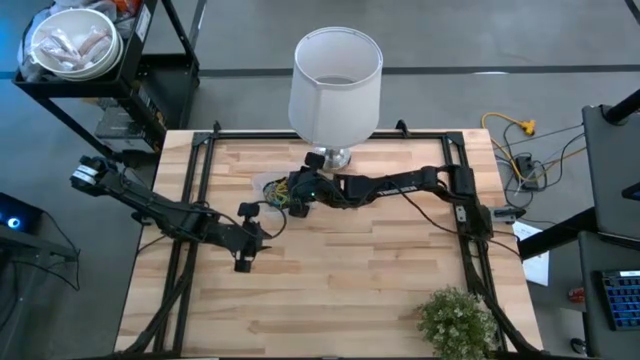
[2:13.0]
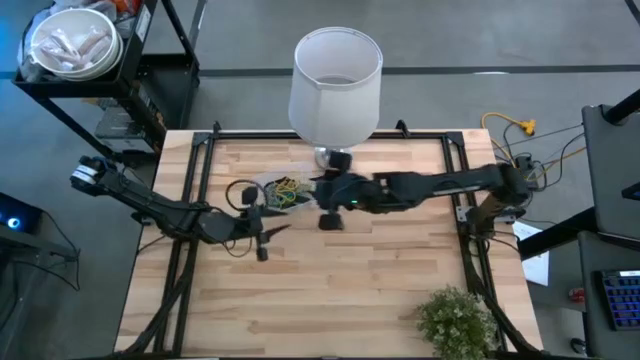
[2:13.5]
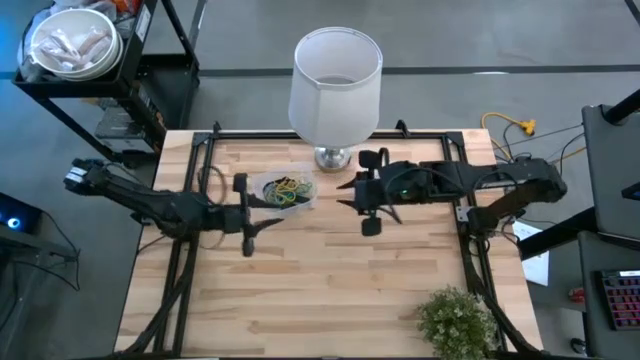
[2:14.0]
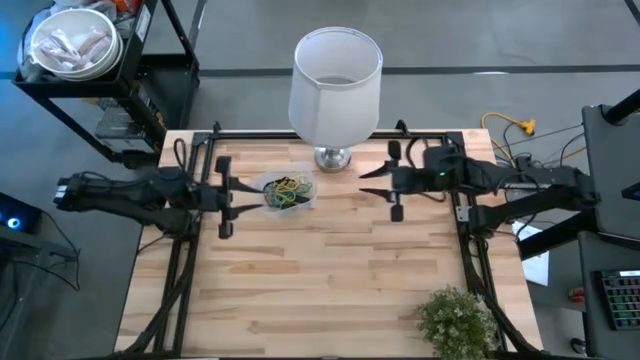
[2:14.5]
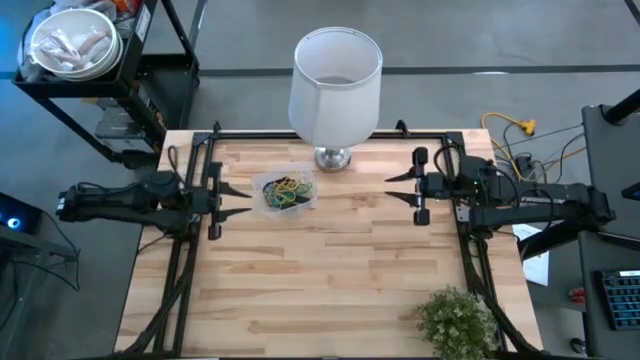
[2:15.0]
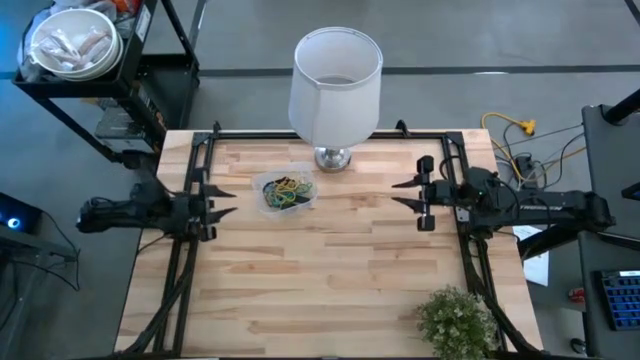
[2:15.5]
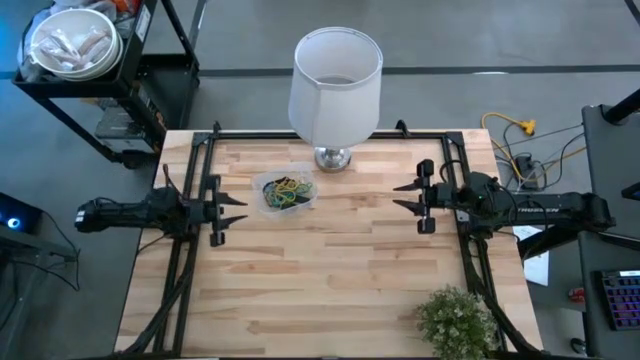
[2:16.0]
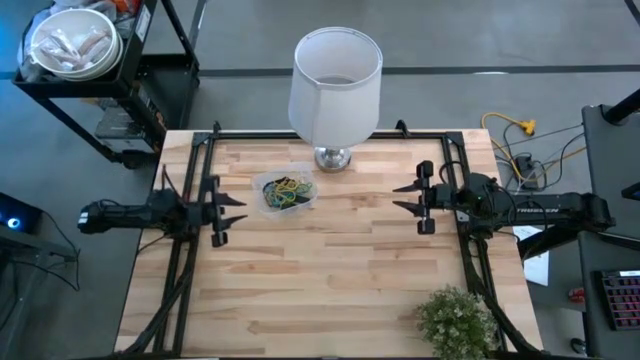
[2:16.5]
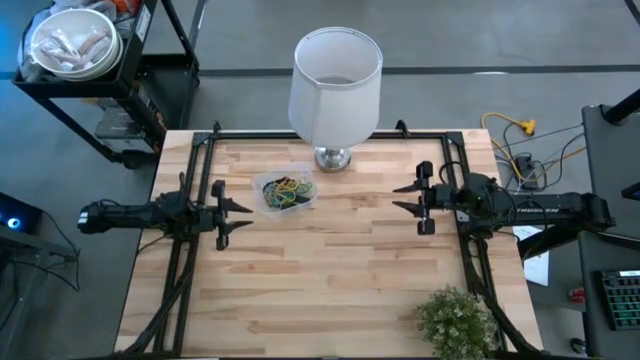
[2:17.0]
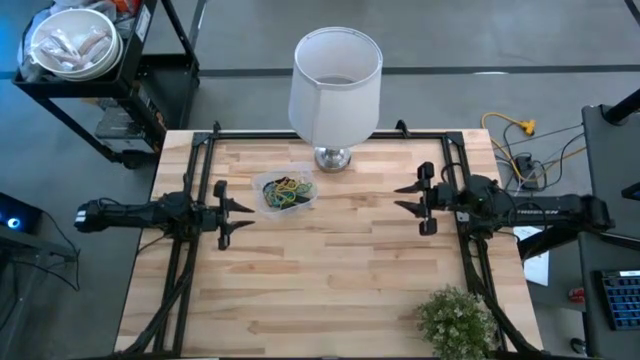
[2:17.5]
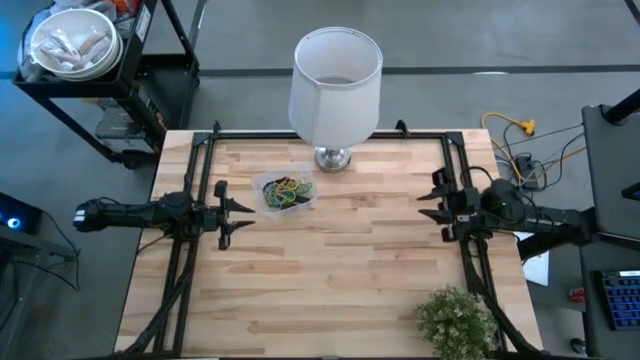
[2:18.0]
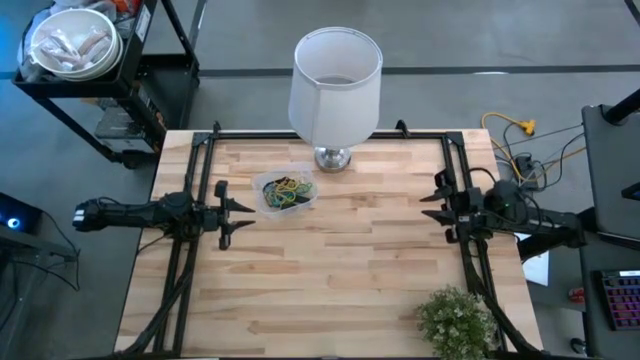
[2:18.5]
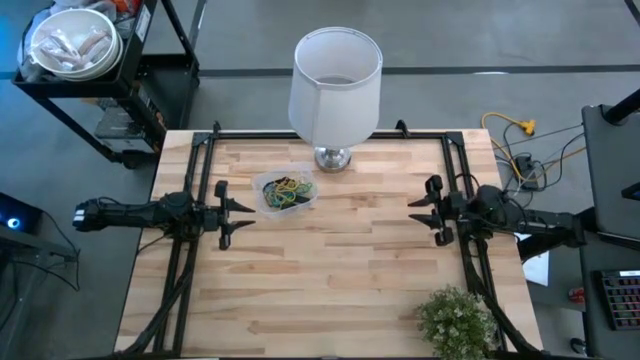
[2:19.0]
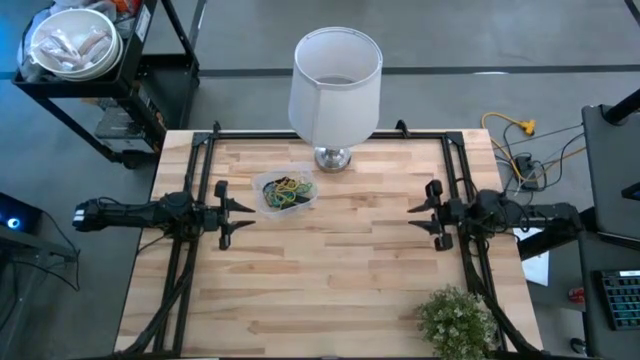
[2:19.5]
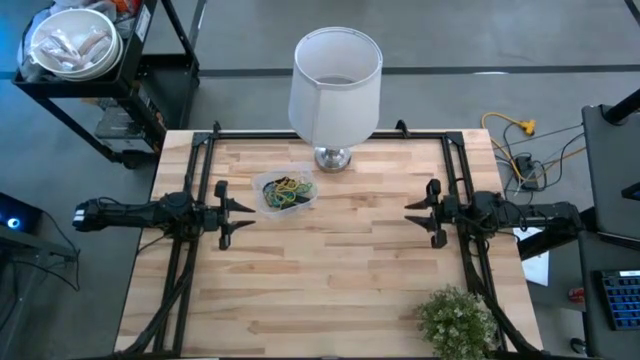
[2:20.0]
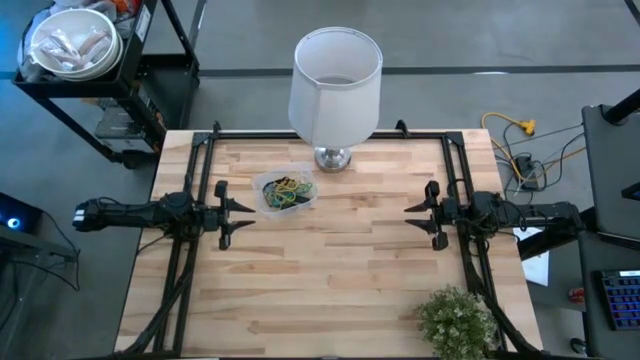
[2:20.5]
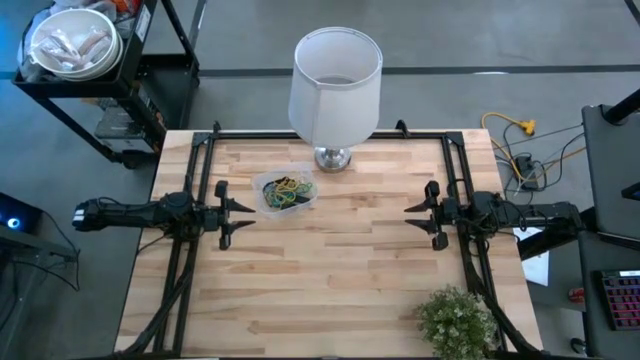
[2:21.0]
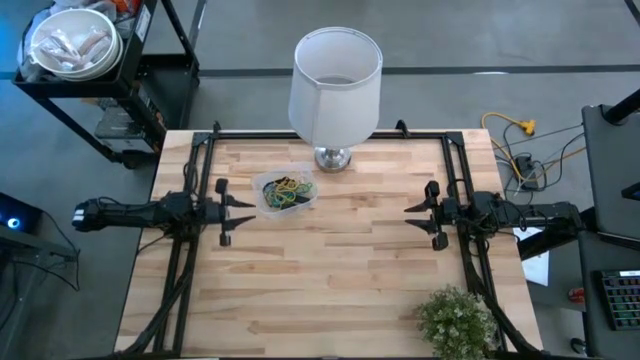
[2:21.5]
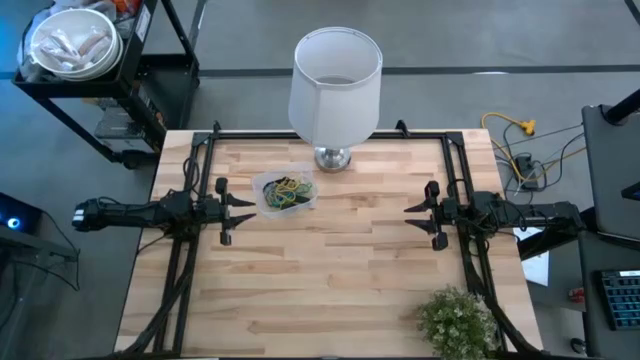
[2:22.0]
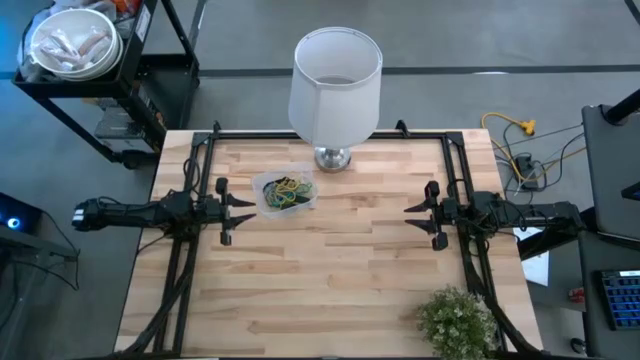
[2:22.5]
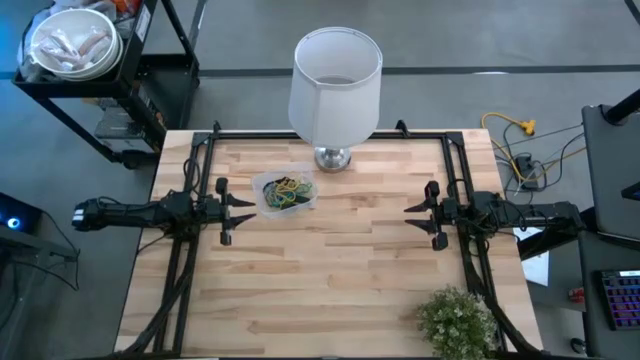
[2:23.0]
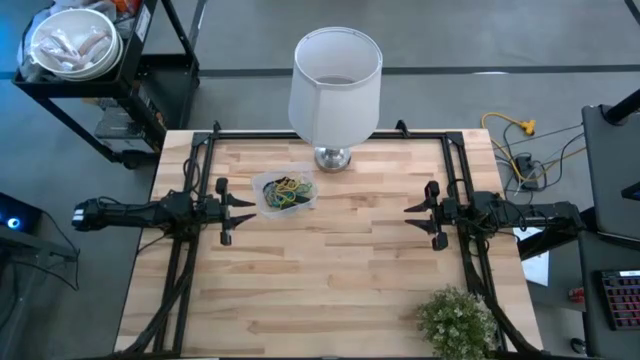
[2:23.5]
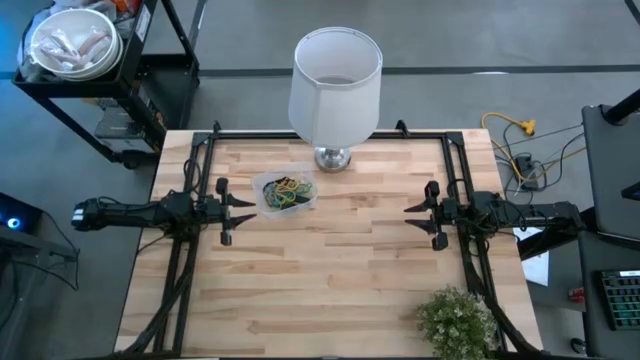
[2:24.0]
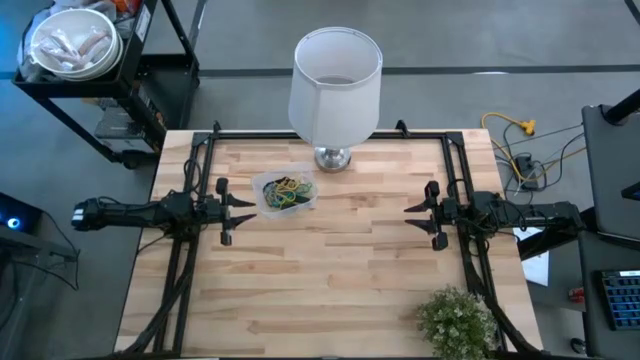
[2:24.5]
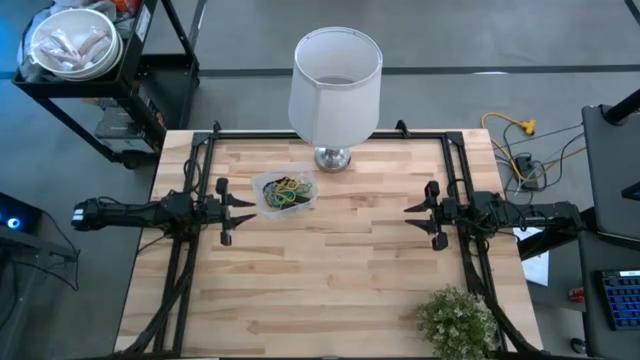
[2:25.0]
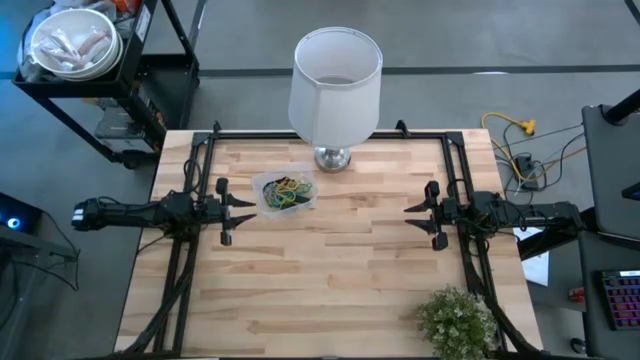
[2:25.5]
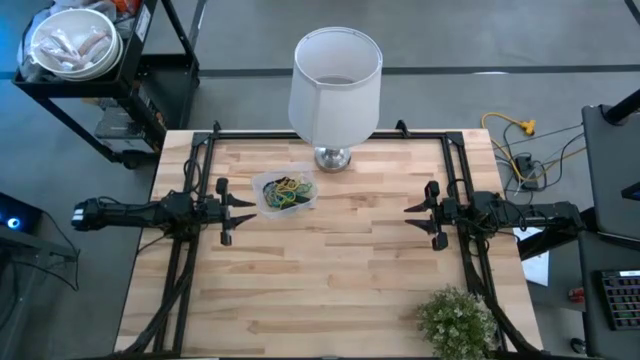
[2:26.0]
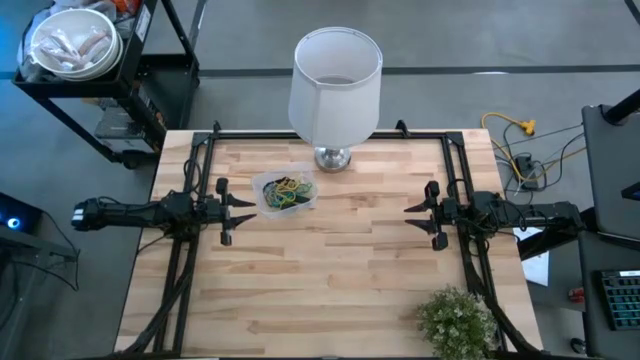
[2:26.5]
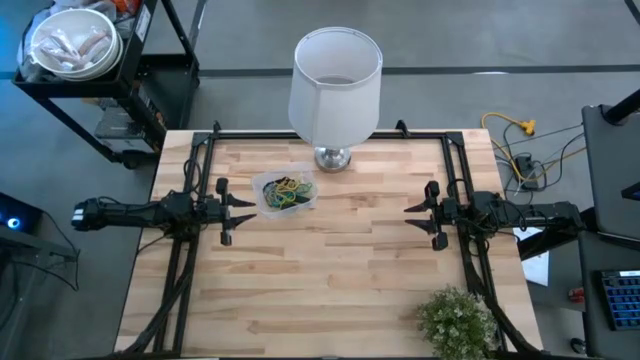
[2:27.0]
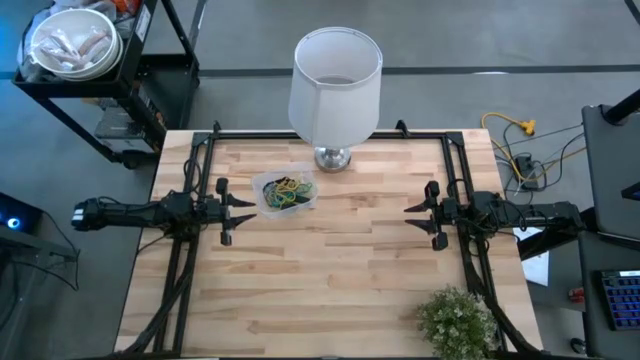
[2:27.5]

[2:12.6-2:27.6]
Task: Pick and place rubber bands into bin
Return to Home Position

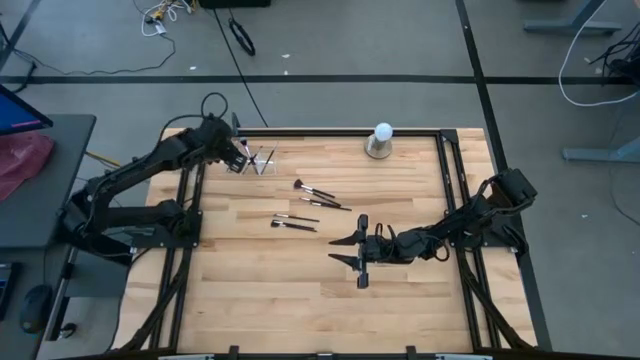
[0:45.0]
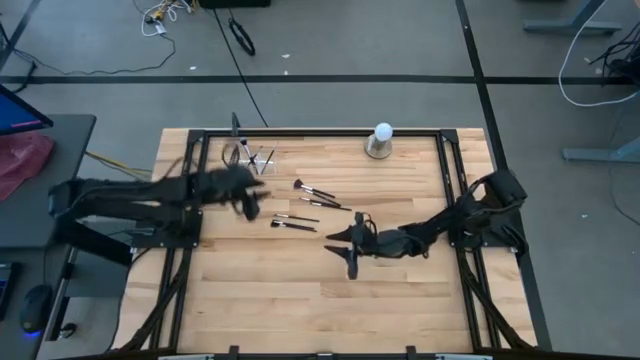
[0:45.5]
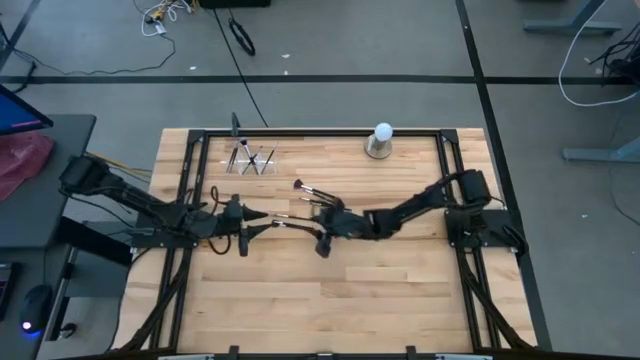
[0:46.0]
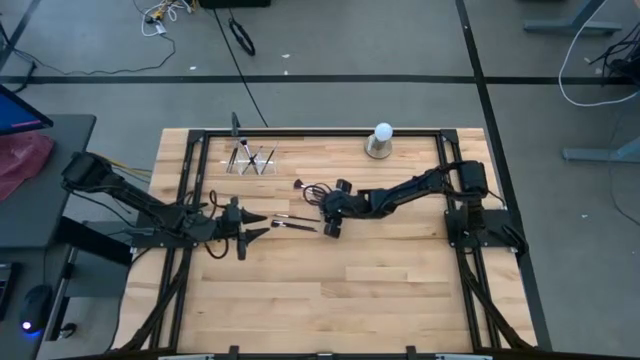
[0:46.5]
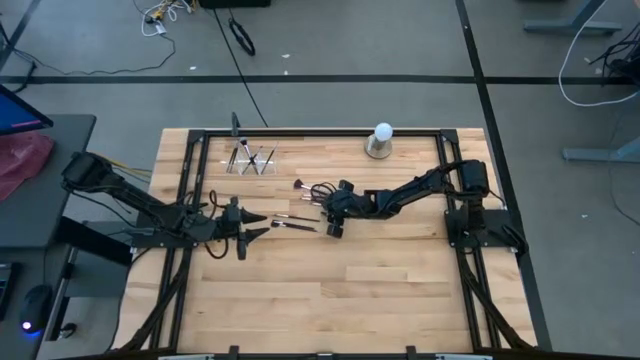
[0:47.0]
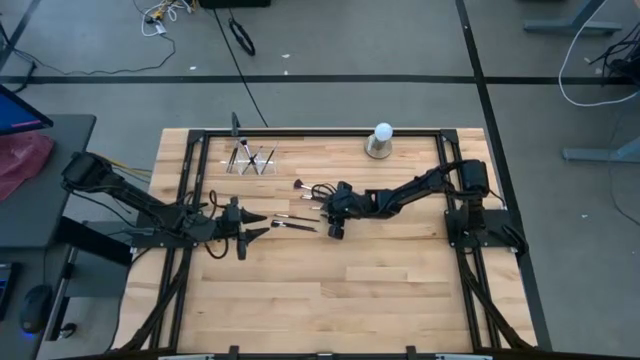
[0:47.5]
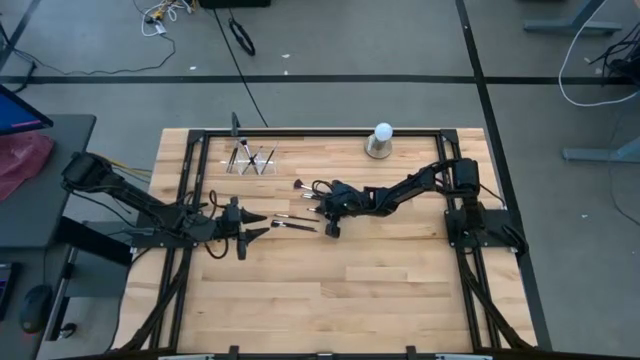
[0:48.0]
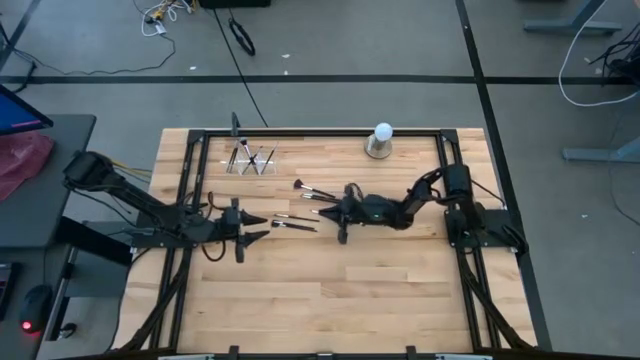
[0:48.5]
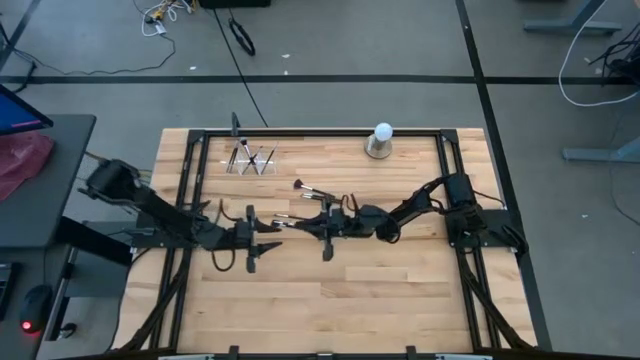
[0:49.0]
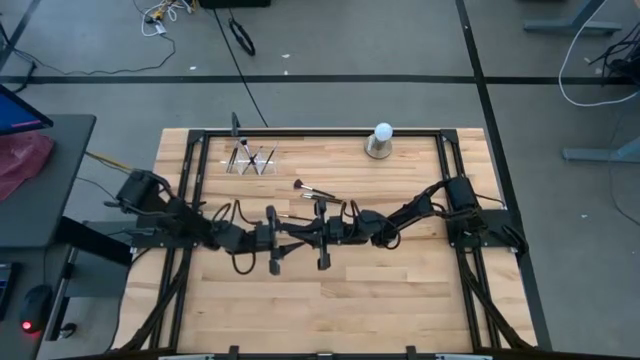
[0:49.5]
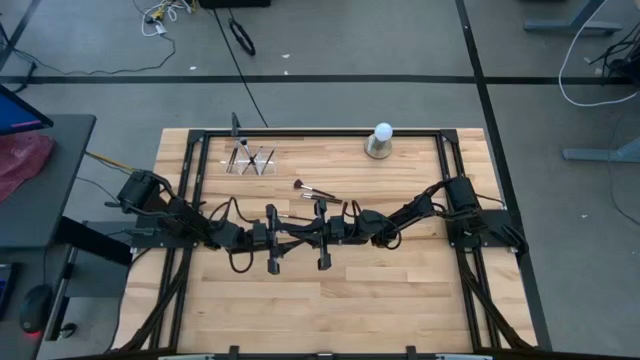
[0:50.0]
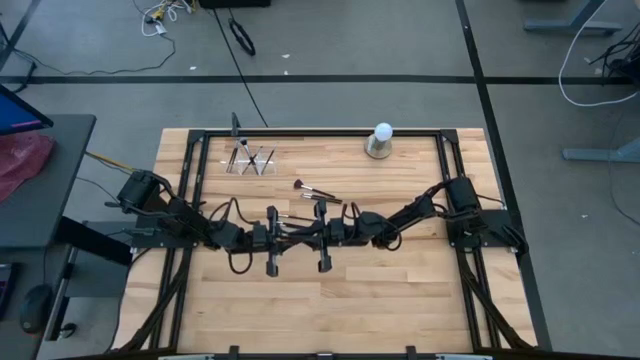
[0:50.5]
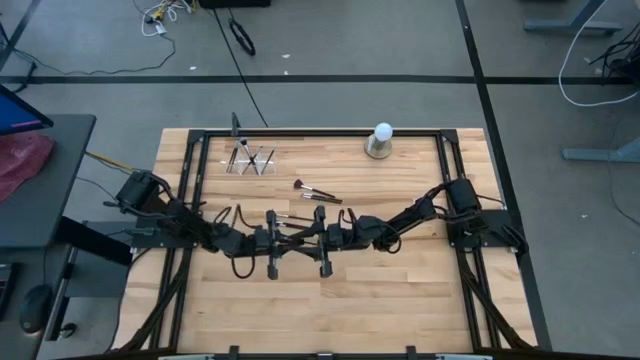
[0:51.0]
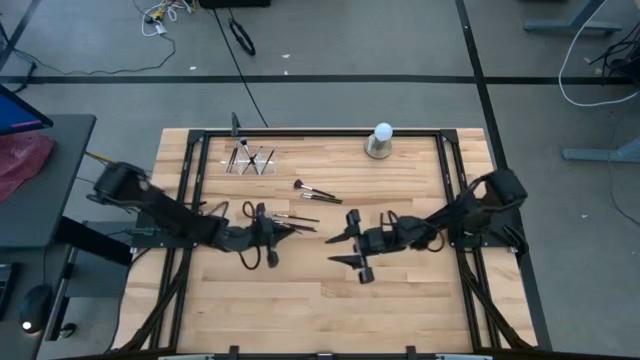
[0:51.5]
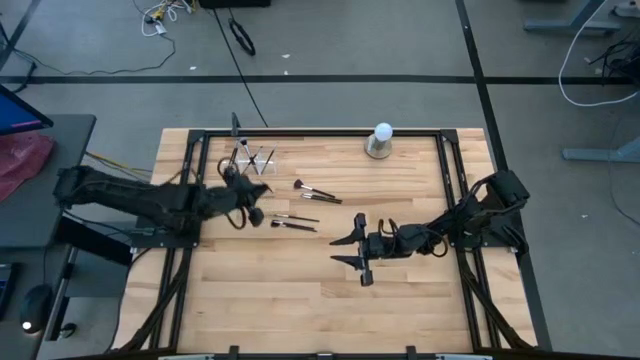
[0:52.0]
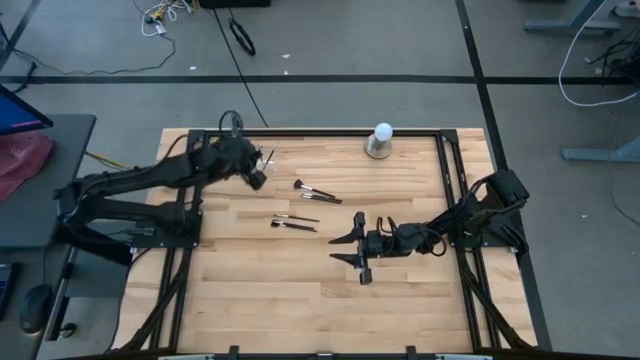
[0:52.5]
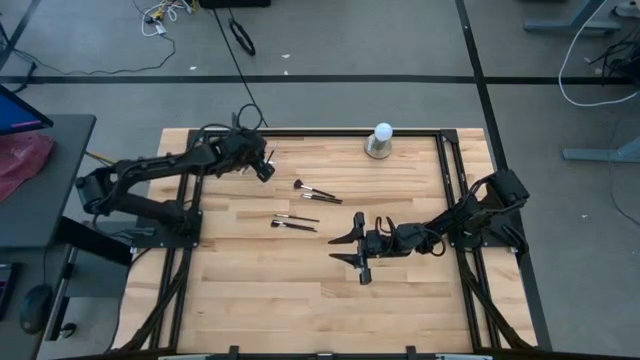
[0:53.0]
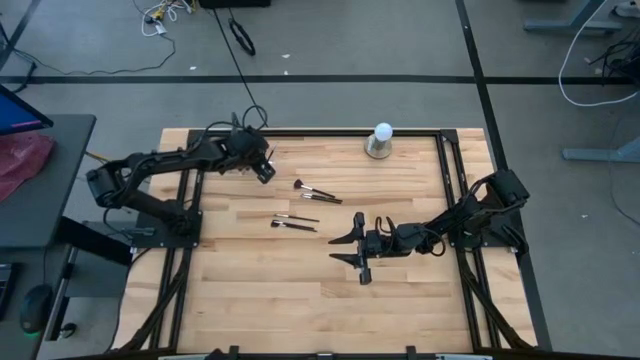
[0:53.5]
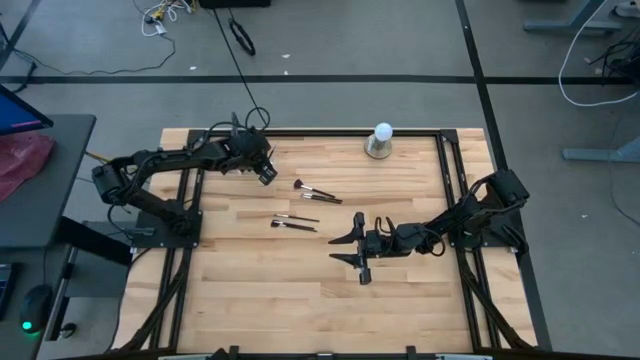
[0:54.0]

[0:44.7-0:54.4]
Task: Put items in baskets/containers
Put the eyeshadow brush into the transparent organizer
